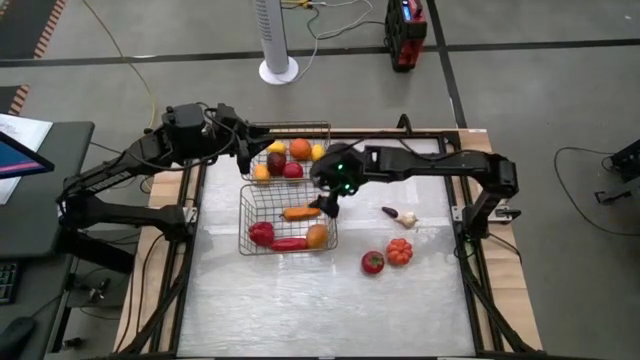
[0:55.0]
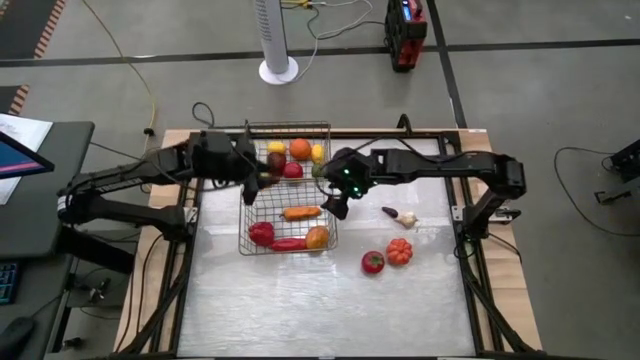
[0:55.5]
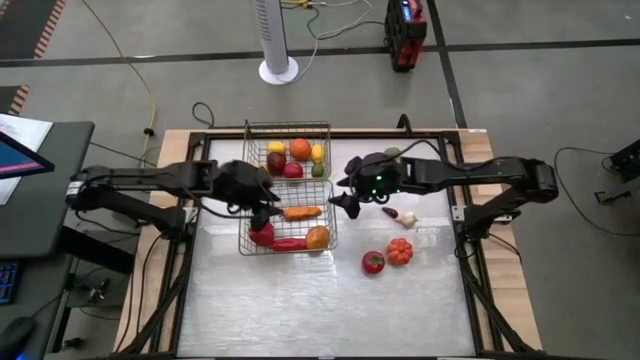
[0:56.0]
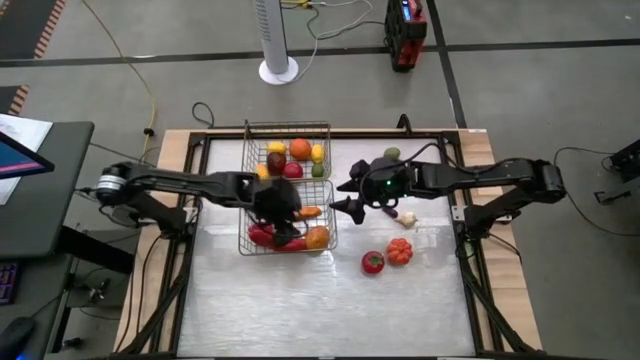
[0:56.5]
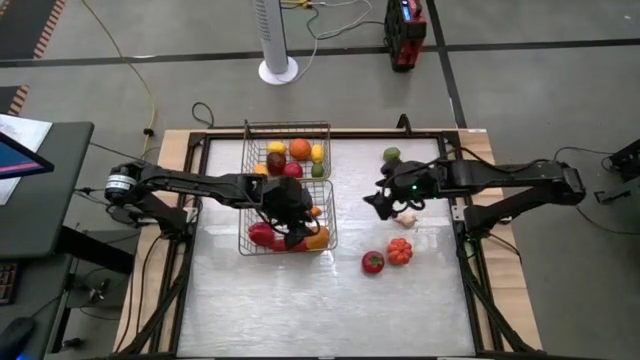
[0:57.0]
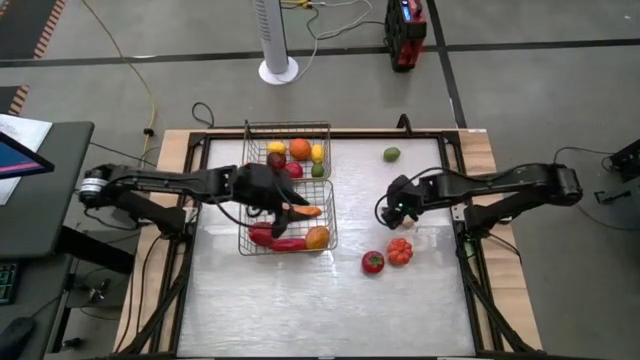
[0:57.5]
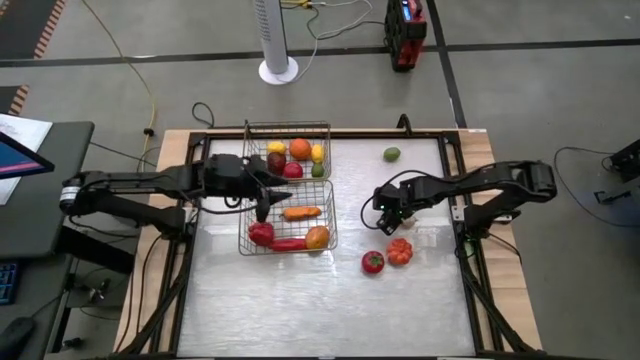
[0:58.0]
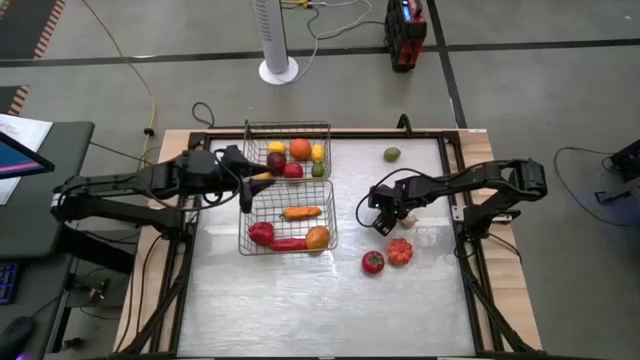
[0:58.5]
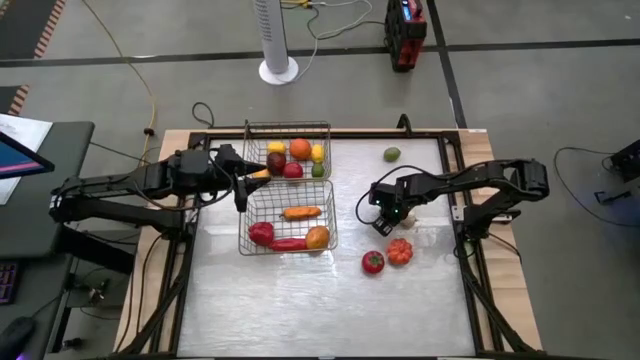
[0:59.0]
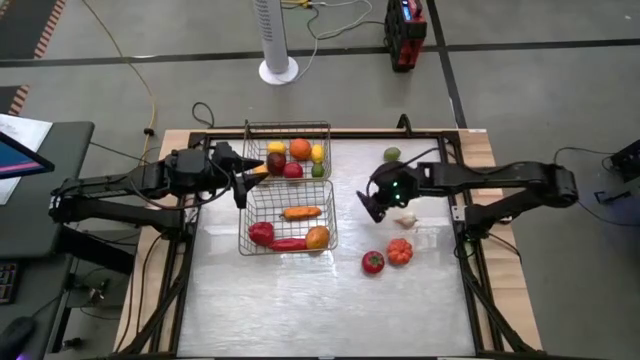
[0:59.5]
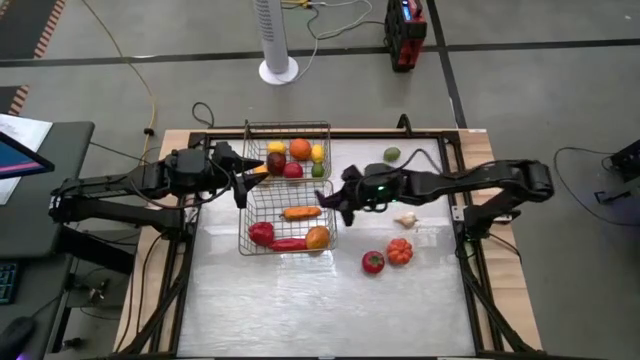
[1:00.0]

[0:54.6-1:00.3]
Task: Sort produce into baskets
Put the purple pepper into the bottom mesh basket

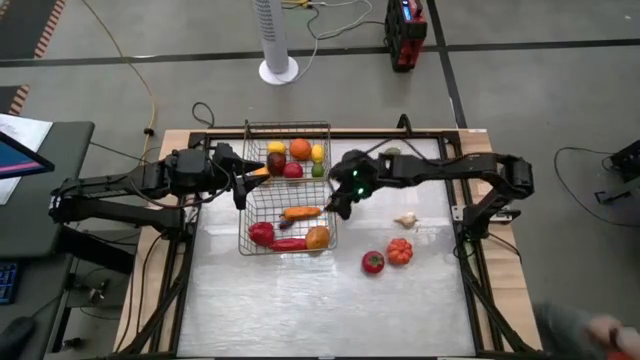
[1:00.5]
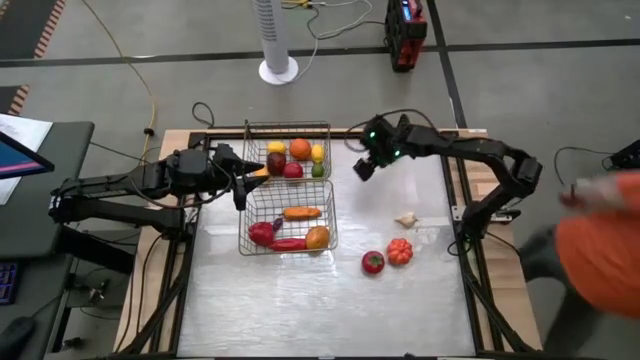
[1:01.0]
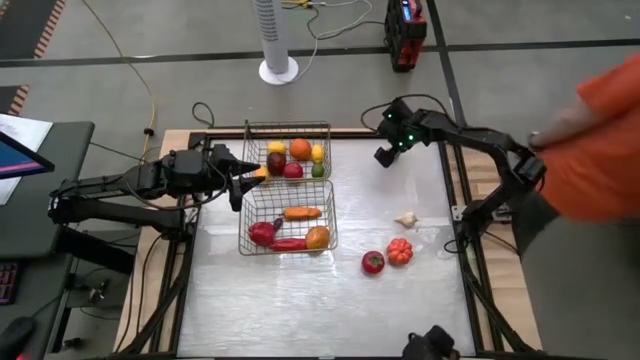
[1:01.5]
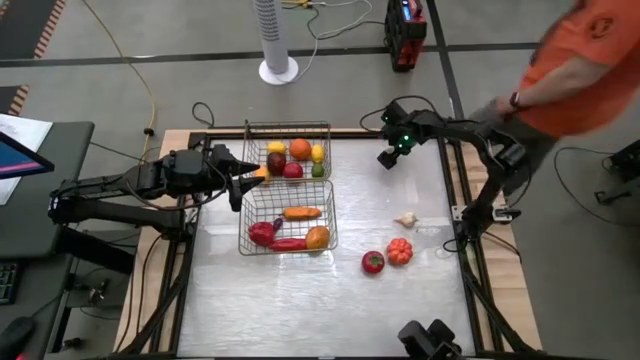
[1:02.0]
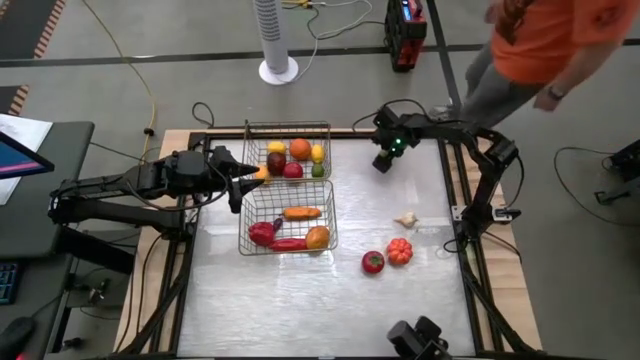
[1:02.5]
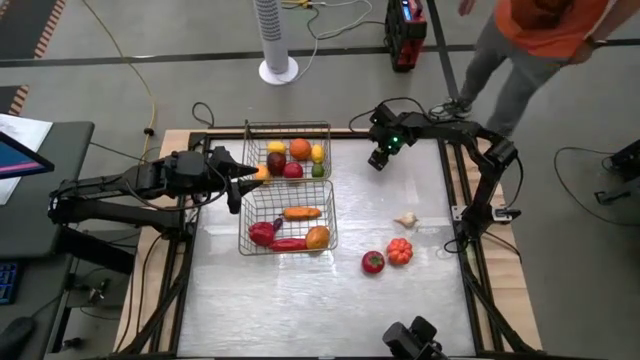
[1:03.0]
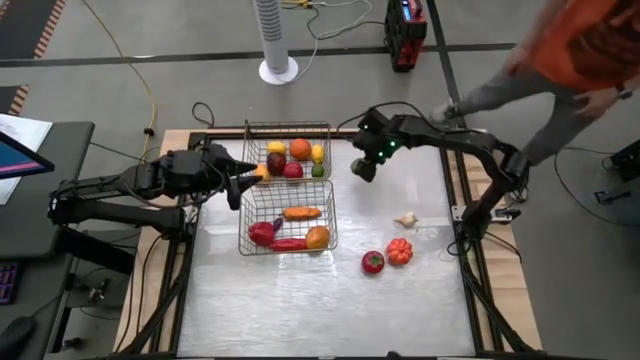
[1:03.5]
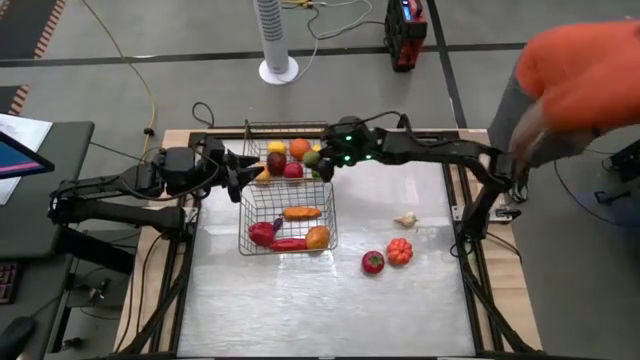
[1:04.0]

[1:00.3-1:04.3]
Put the green lime into the top mesh basket

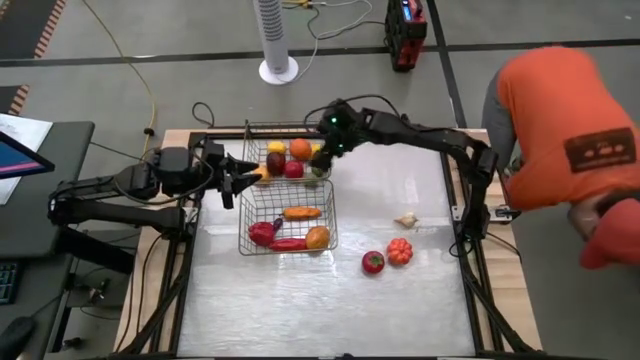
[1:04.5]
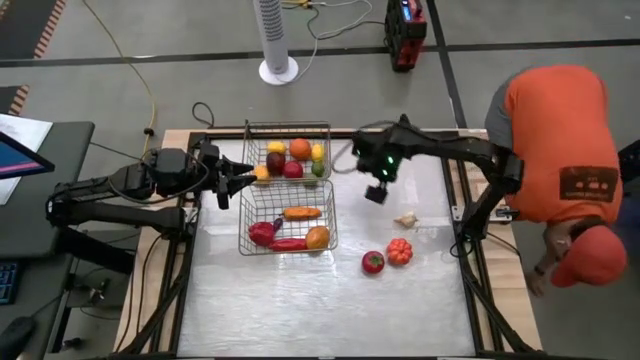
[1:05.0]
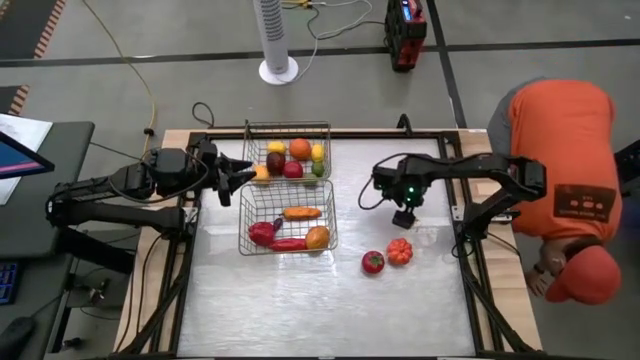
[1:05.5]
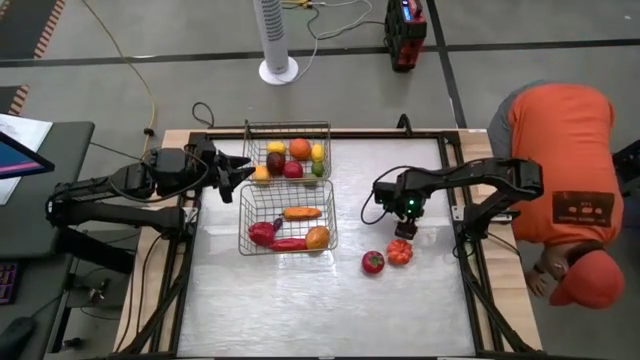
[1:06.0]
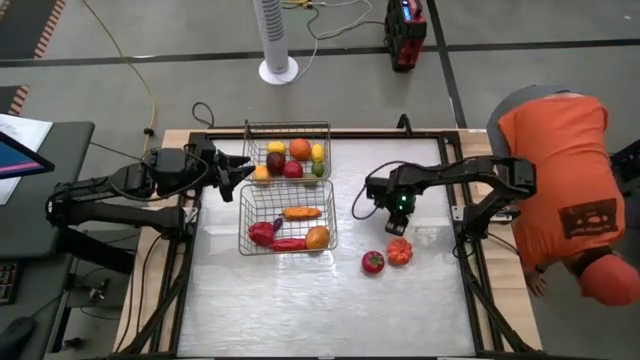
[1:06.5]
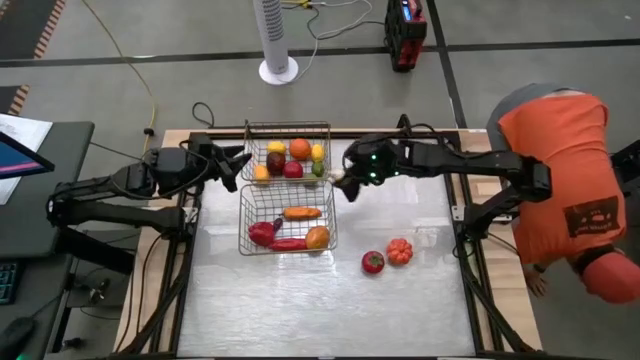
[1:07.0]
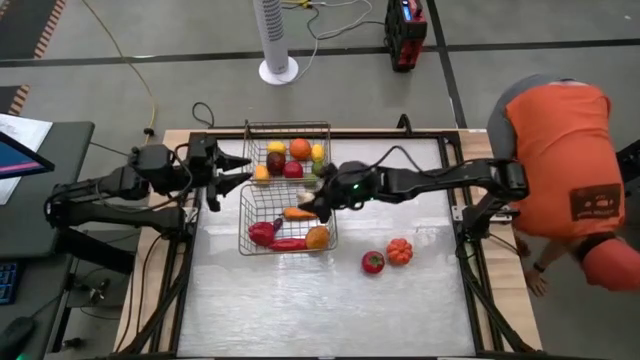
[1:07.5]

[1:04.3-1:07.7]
Put the white garlic into the bottom mesh basket

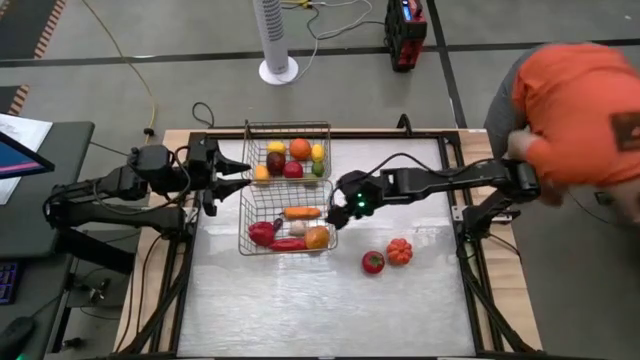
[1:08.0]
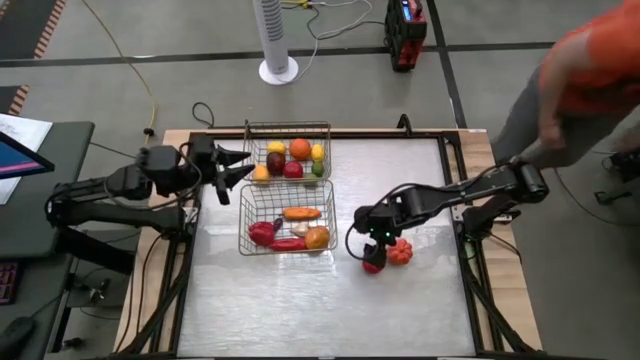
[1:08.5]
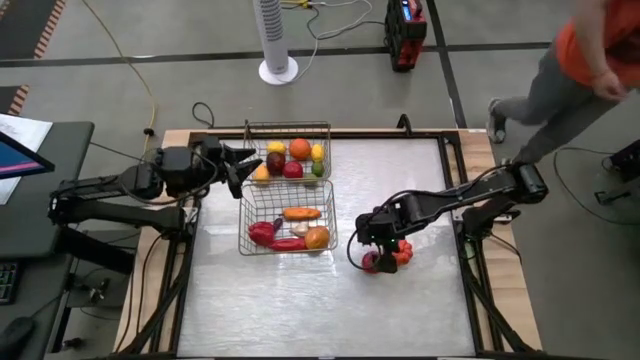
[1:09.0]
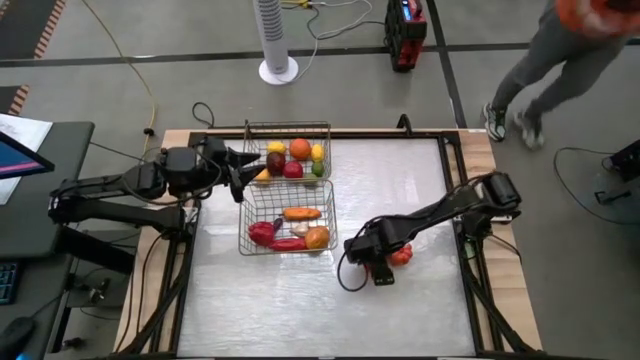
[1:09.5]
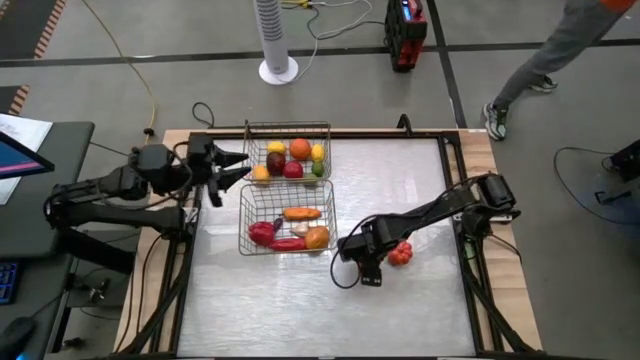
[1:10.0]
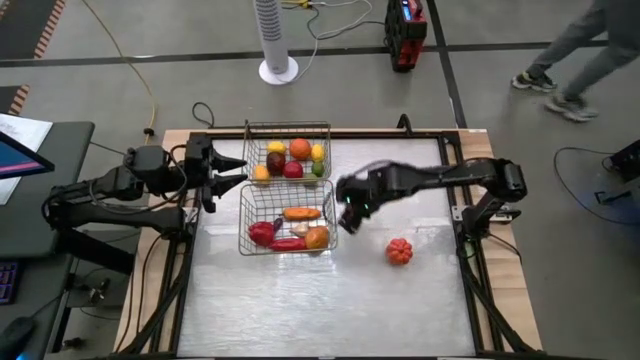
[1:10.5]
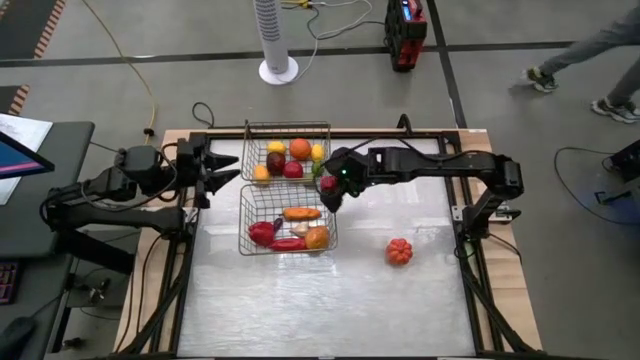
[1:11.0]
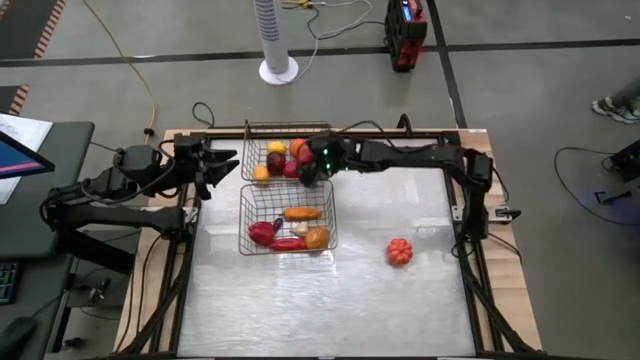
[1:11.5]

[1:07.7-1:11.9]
Put the red tomato into the top mesh basket

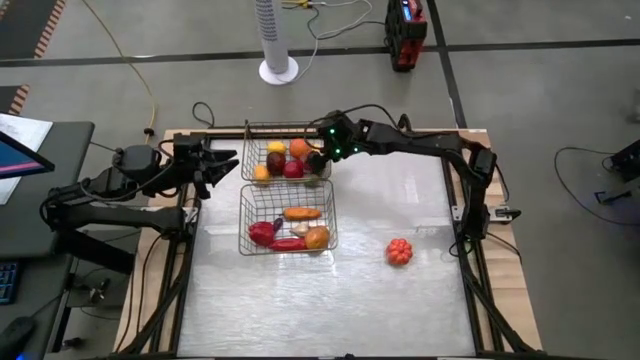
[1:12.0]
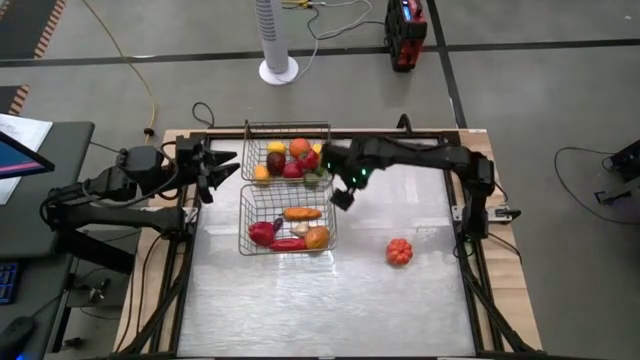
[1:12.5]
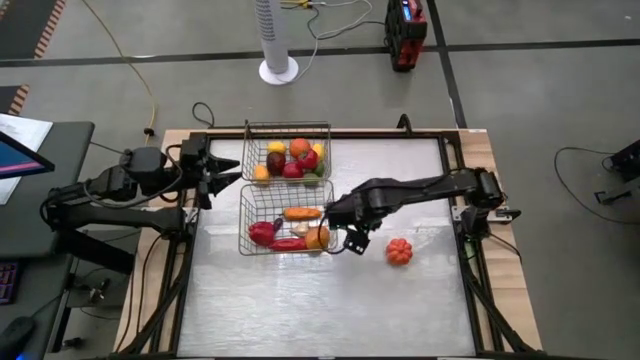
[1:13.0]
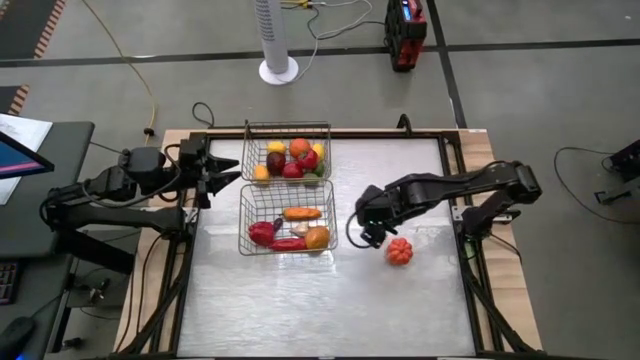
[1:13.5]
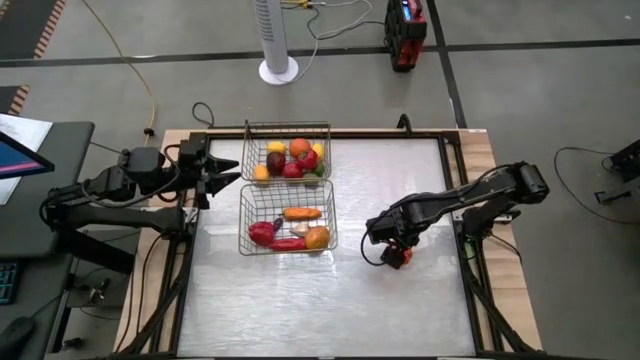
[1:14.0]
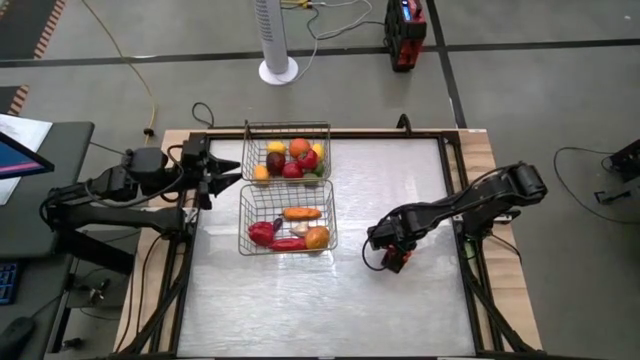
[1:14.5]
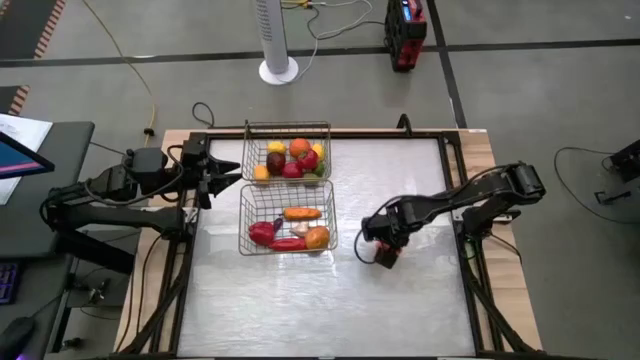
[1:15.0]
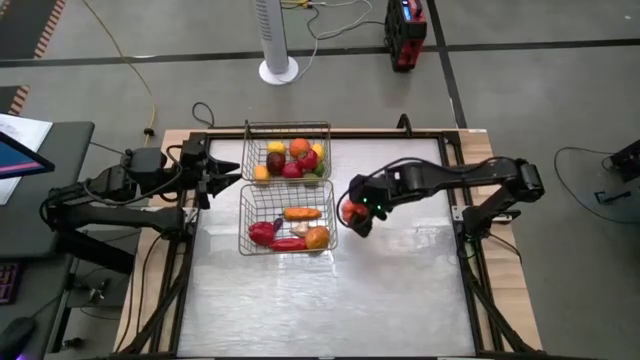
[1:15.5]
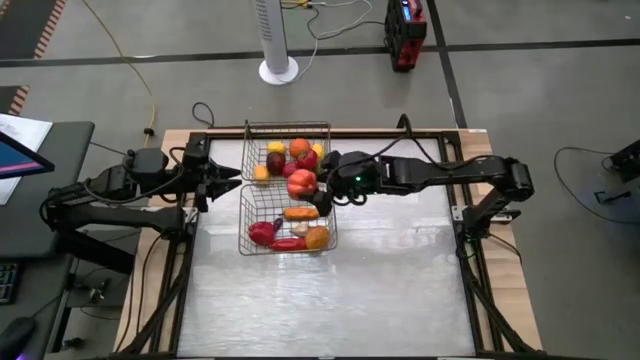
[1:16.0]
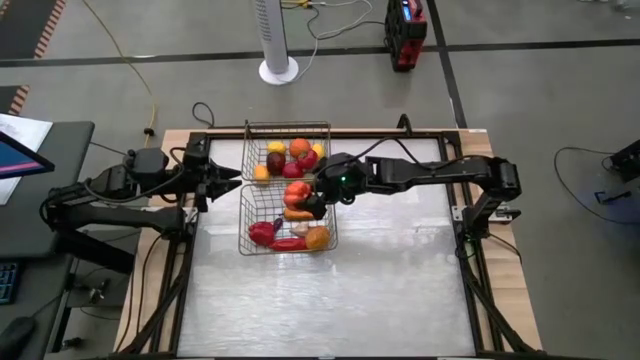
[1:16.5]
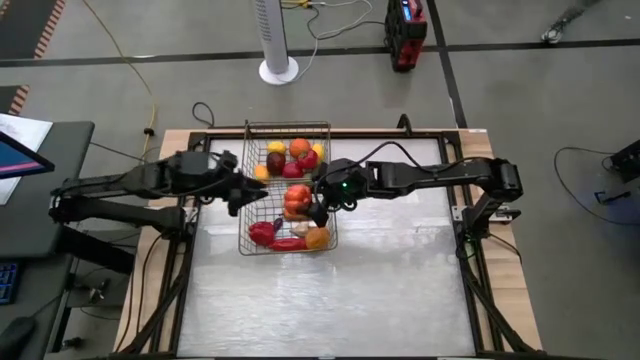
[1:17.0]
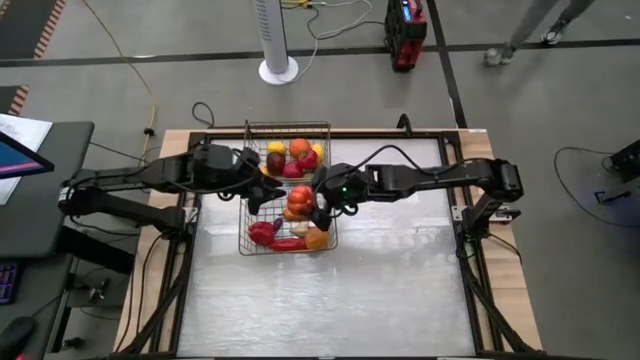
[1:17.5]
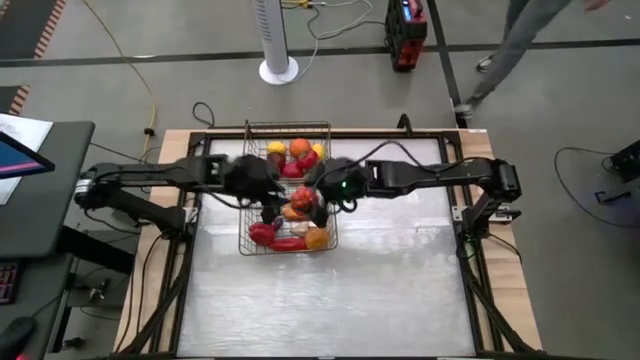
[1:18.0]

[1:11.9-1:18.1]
Put the orange pumpkin into the bottom mesh basket
